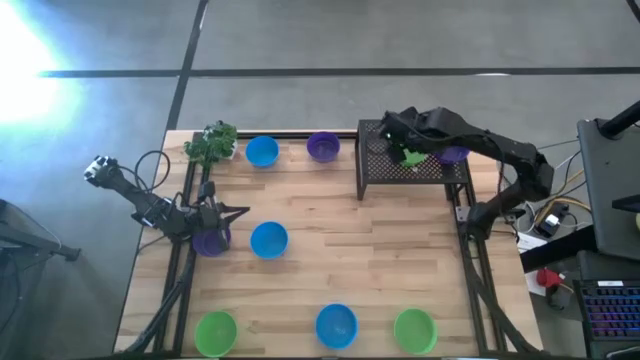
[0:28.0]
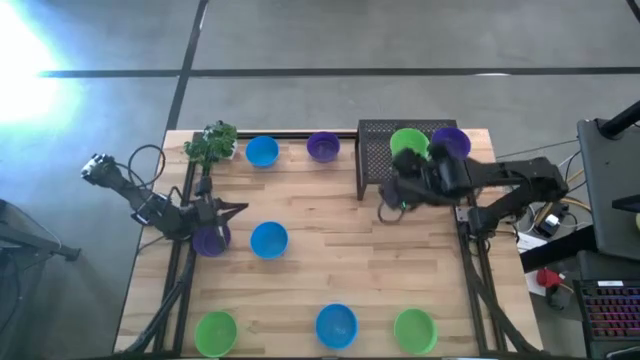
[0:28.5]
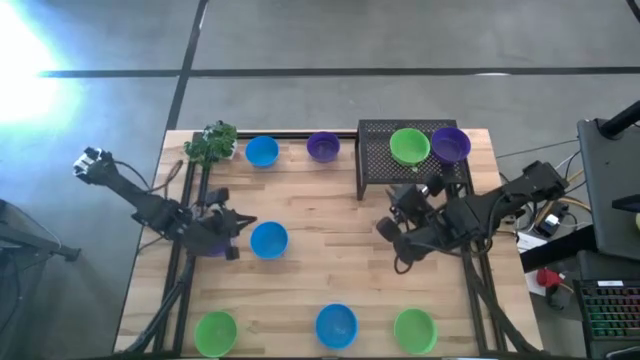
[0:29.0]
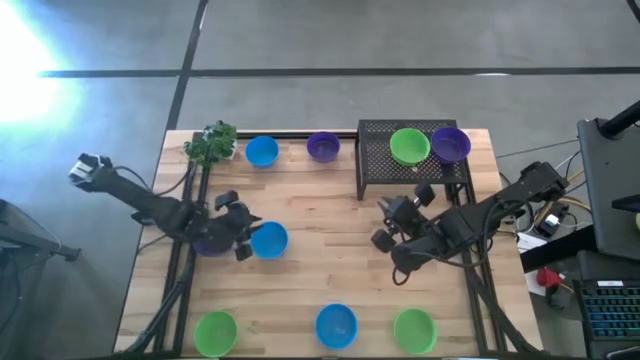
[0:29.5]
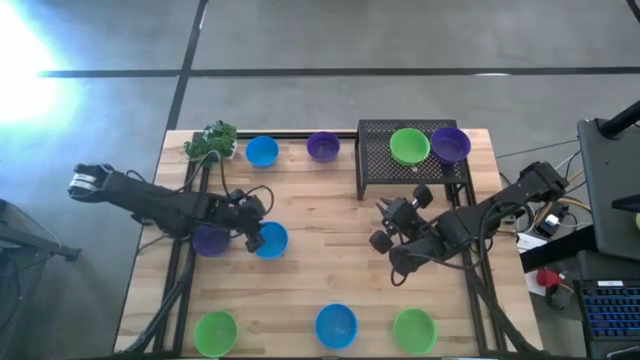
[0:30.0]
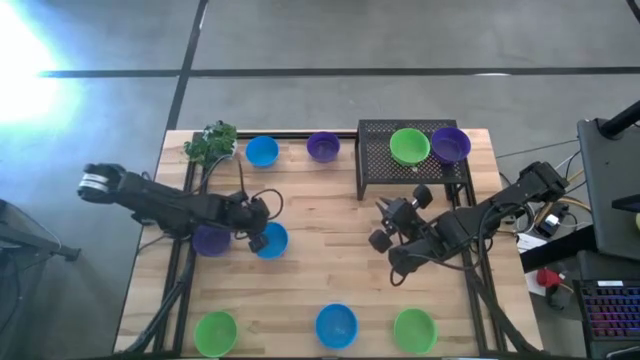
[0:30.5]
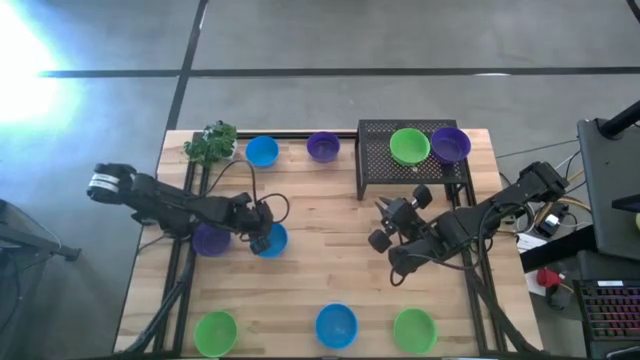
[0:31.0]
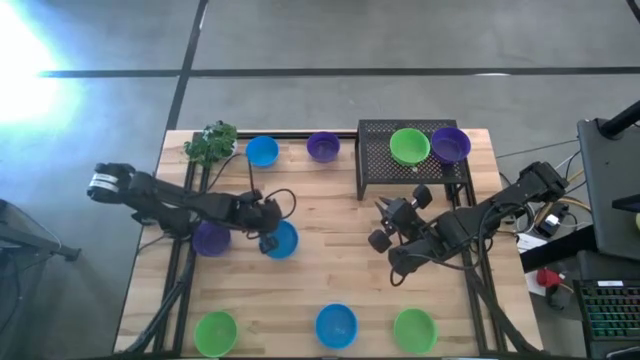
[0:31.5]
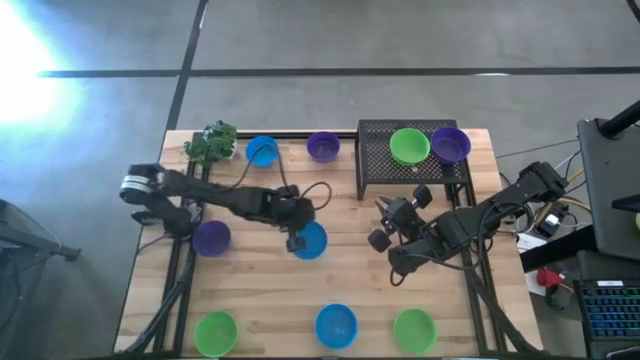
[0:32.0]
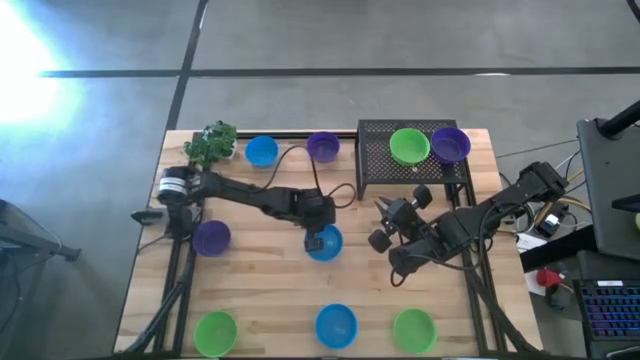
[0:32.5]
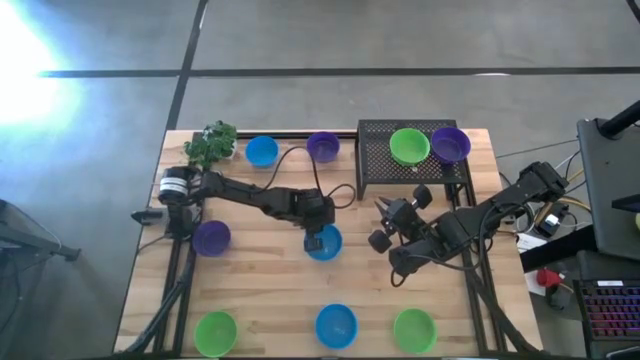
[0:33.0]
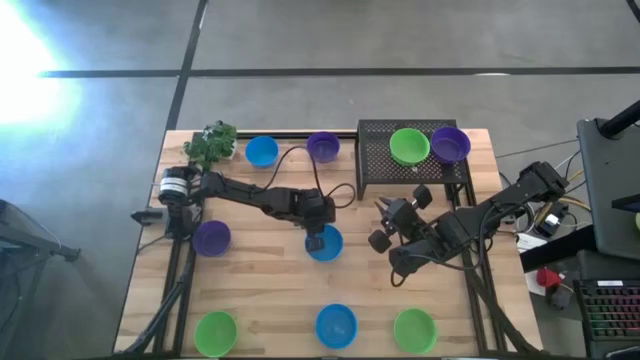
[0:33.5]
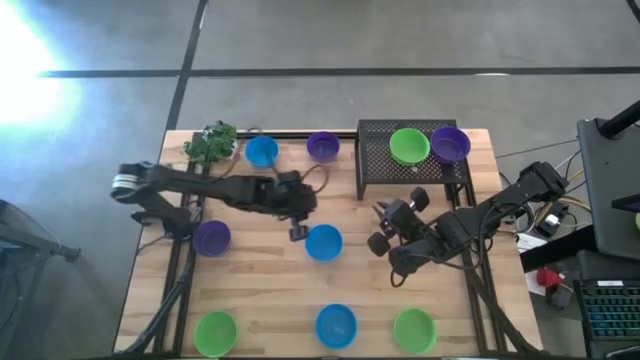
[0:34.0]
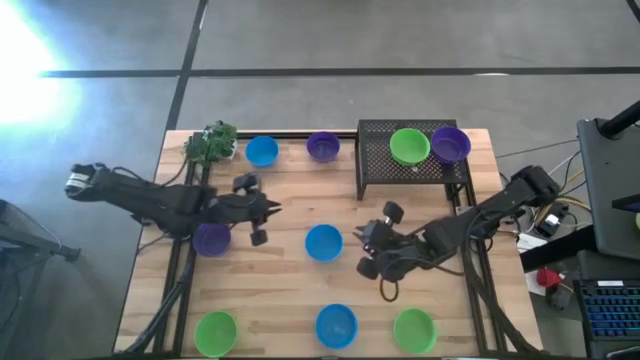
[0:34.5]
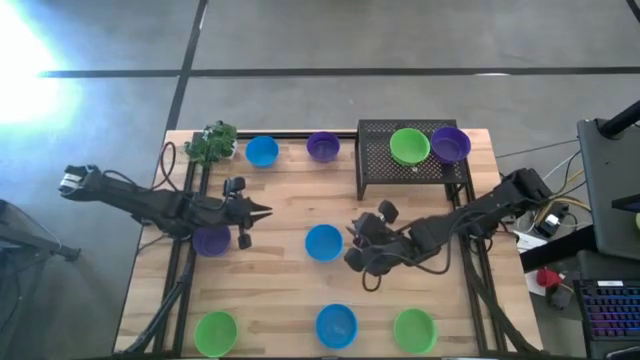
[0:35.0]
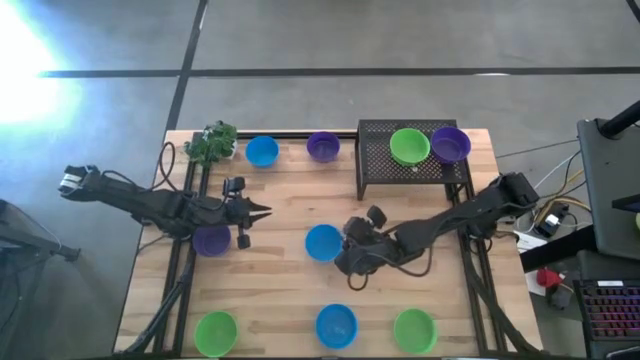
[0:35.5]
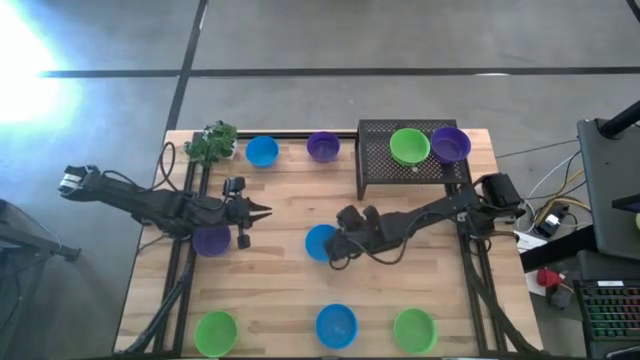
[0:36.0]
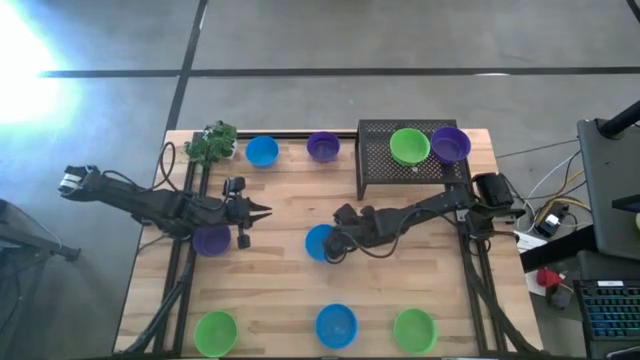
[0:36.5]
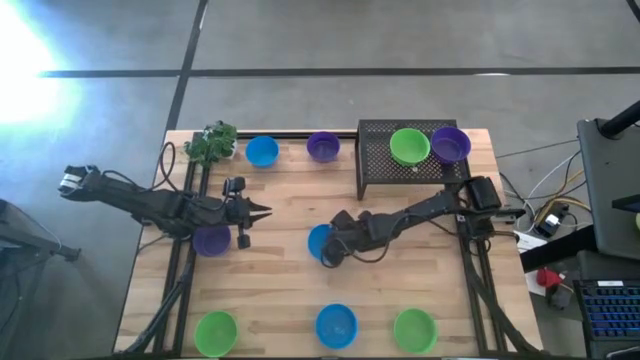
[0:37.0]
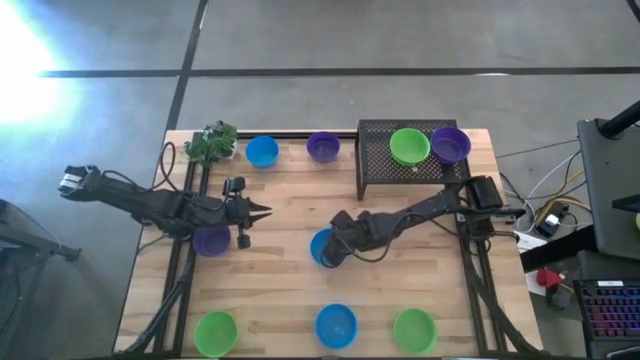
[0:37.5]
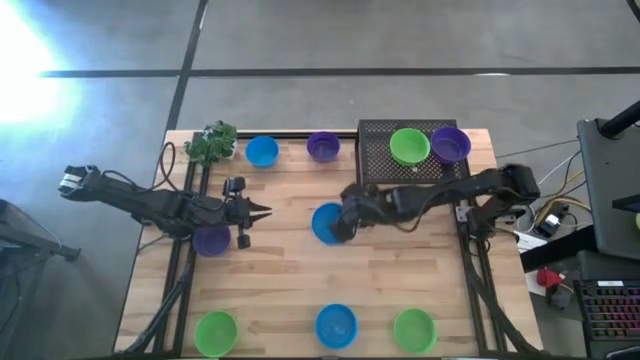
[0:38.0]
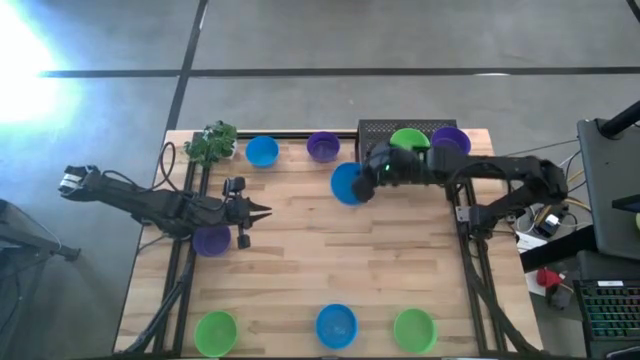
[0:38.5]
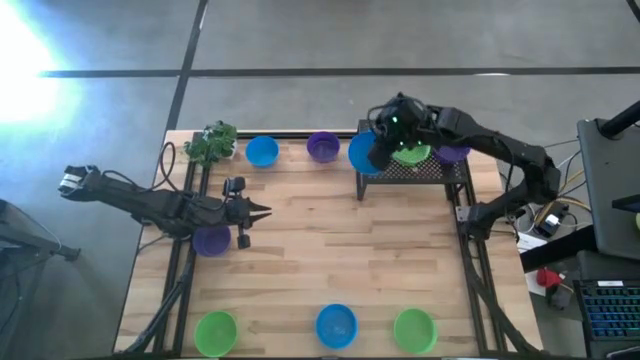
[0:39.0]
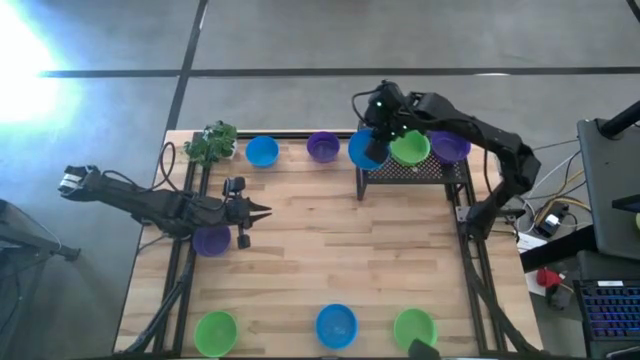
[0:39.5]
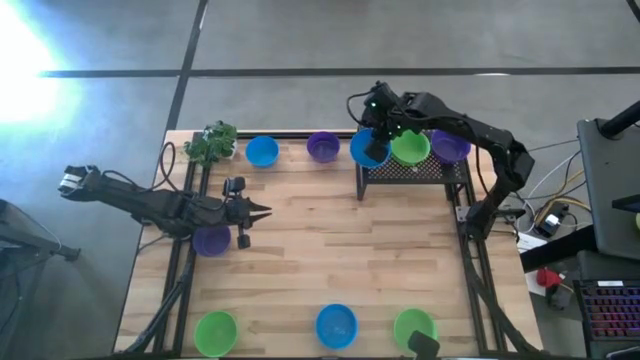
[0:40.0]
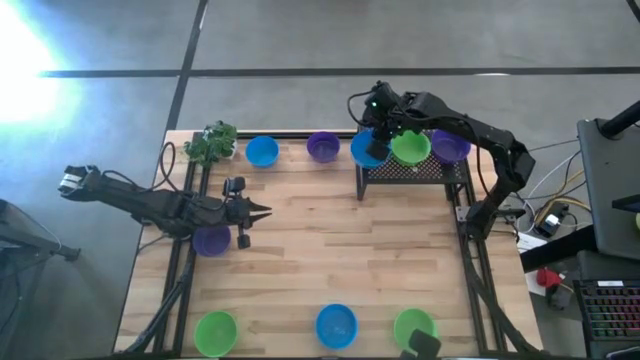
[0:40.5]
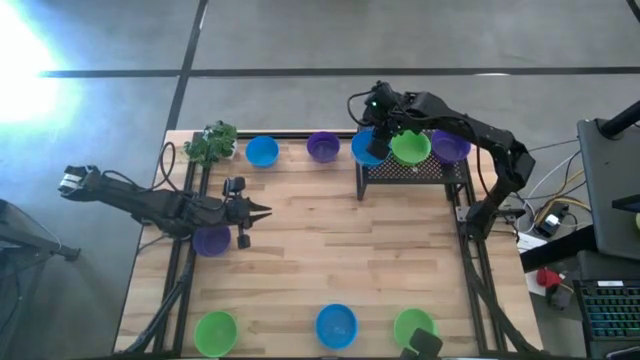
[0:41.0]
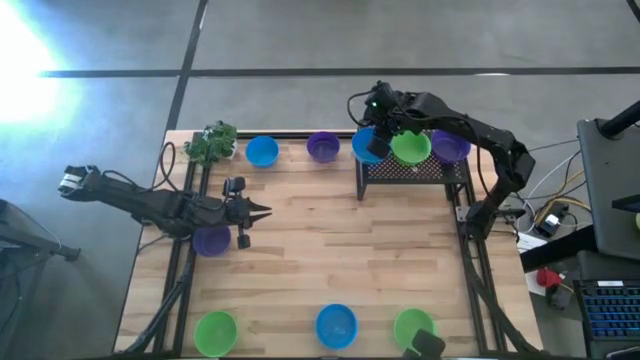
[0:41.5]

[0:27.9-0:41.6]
Task: Pick & Place Mini bowls
Put the middle blue bowl on the shelf
